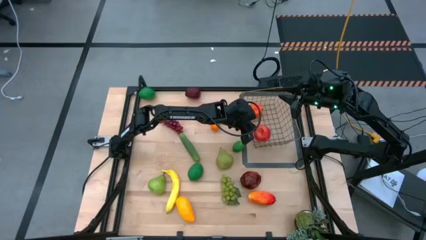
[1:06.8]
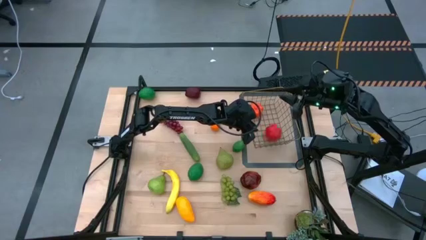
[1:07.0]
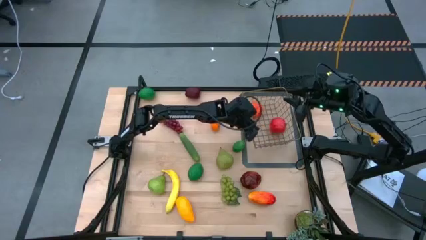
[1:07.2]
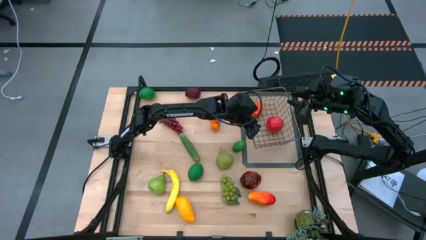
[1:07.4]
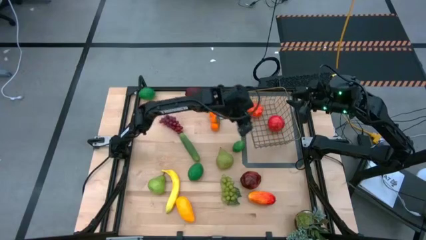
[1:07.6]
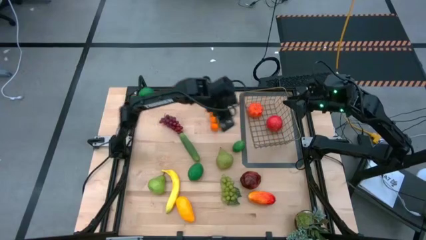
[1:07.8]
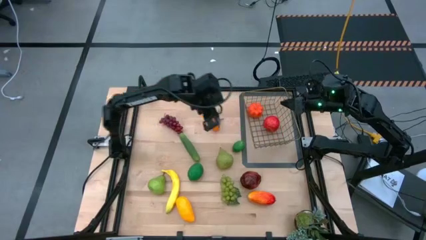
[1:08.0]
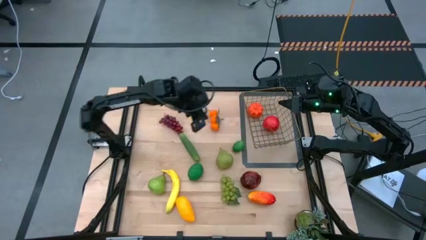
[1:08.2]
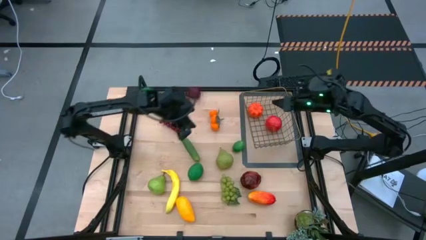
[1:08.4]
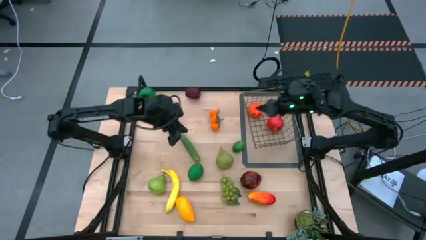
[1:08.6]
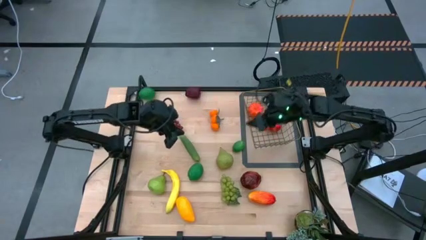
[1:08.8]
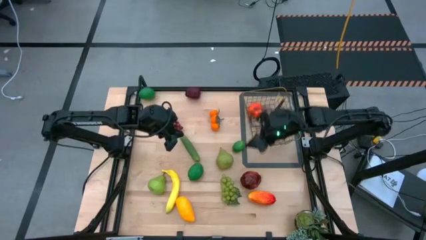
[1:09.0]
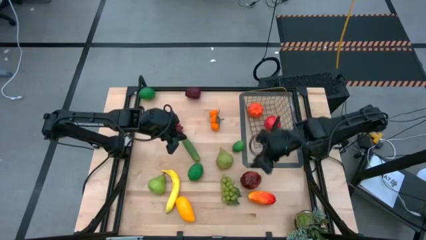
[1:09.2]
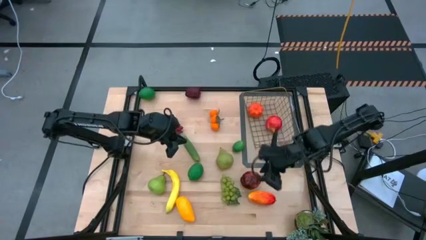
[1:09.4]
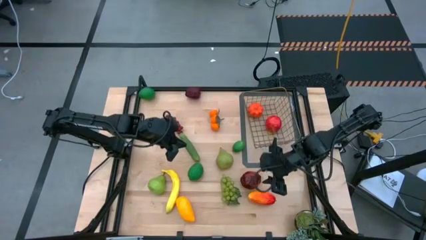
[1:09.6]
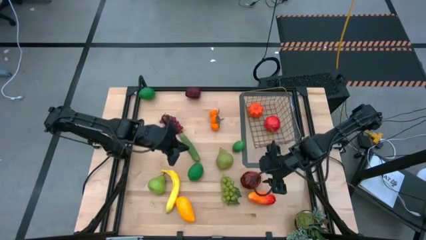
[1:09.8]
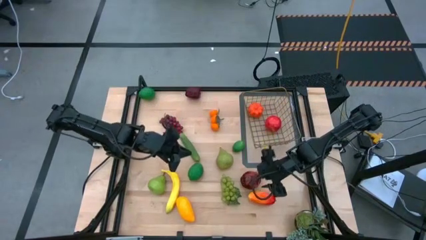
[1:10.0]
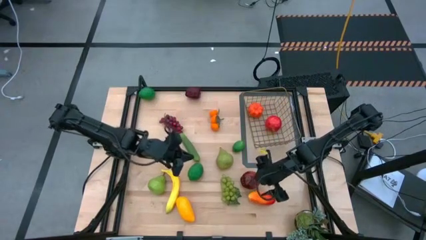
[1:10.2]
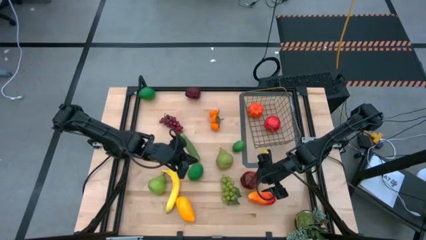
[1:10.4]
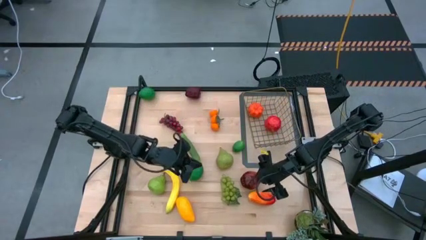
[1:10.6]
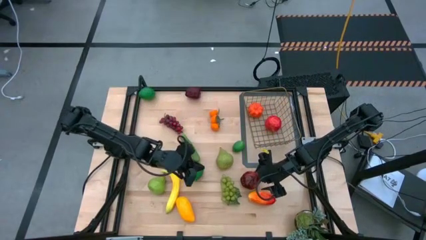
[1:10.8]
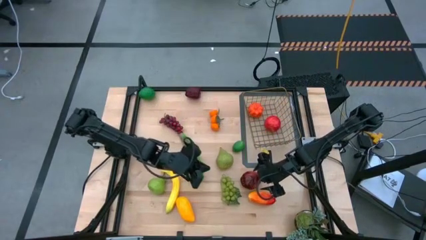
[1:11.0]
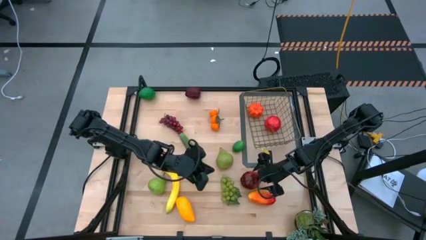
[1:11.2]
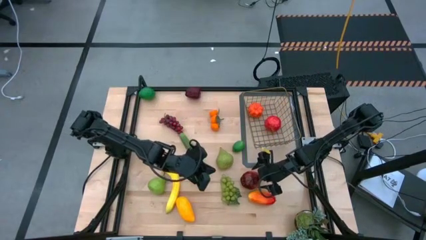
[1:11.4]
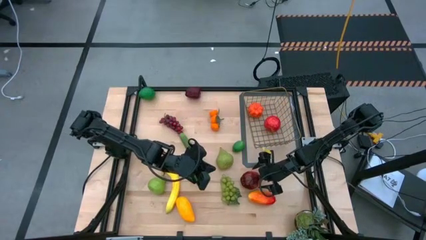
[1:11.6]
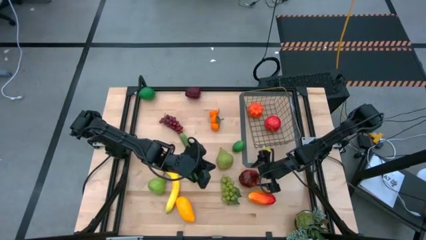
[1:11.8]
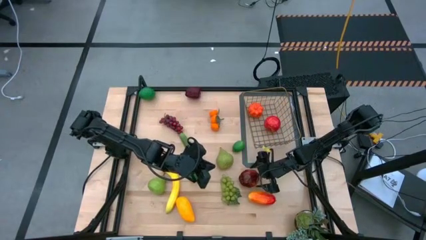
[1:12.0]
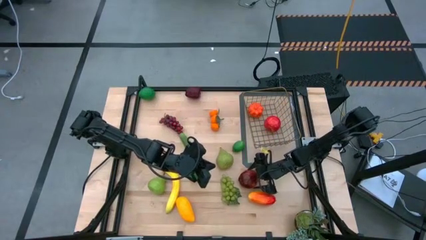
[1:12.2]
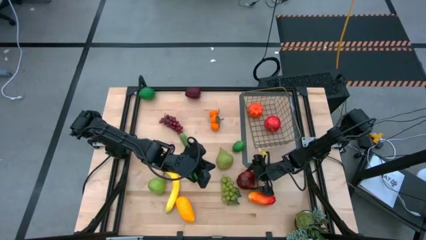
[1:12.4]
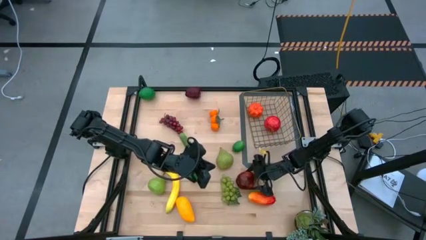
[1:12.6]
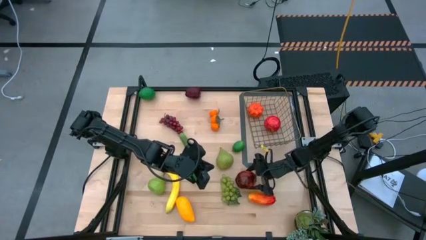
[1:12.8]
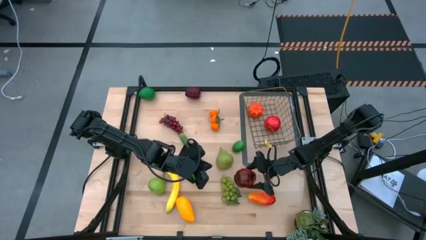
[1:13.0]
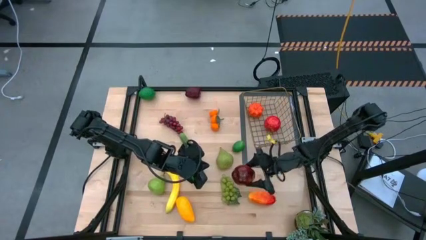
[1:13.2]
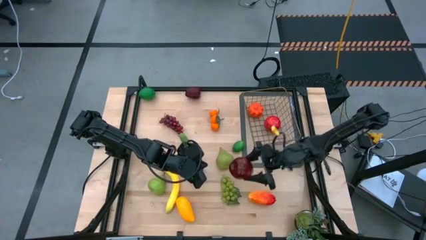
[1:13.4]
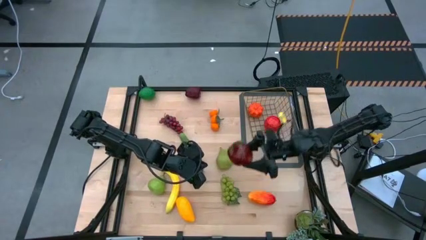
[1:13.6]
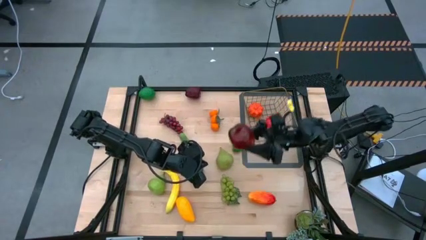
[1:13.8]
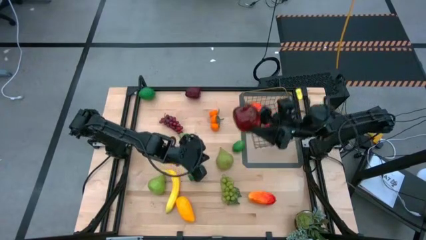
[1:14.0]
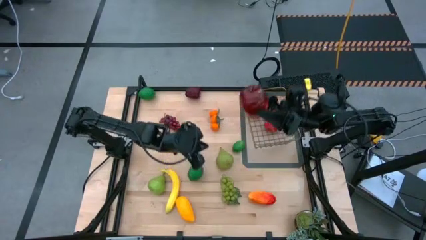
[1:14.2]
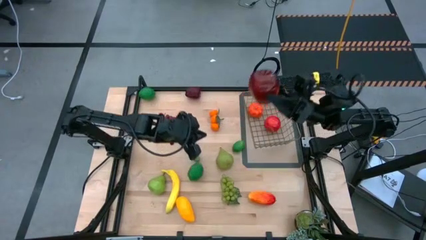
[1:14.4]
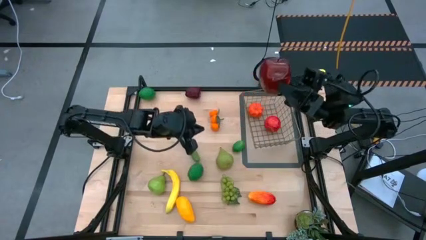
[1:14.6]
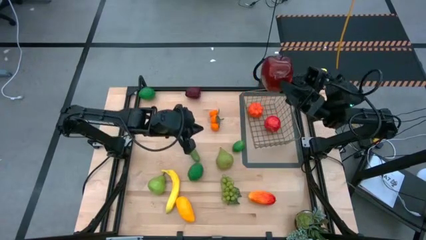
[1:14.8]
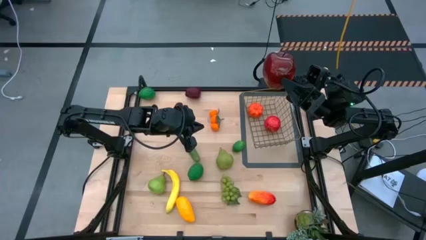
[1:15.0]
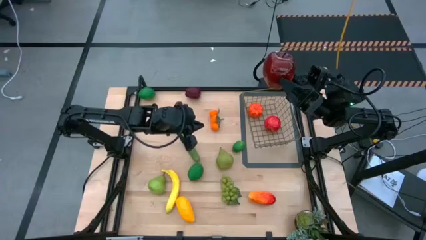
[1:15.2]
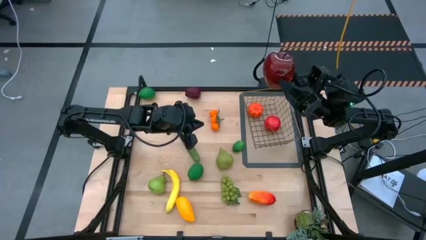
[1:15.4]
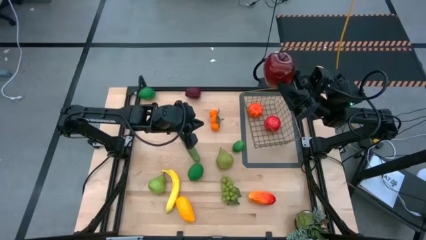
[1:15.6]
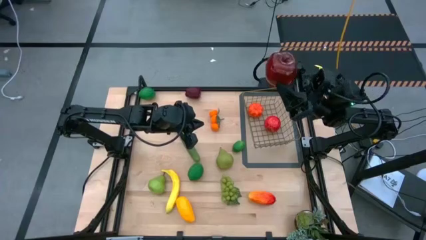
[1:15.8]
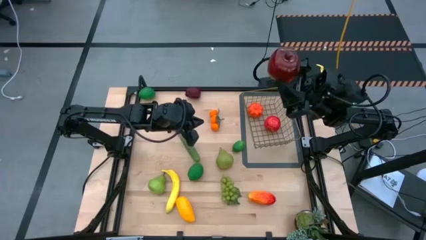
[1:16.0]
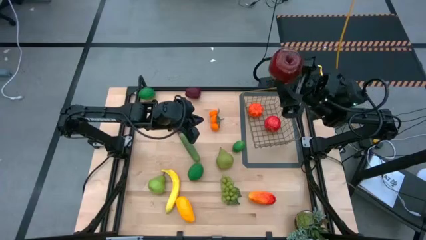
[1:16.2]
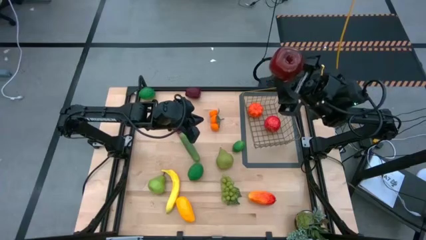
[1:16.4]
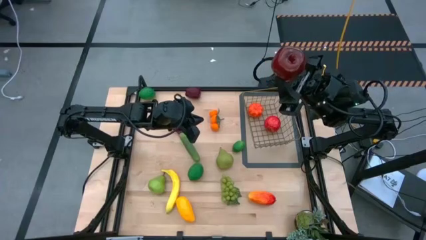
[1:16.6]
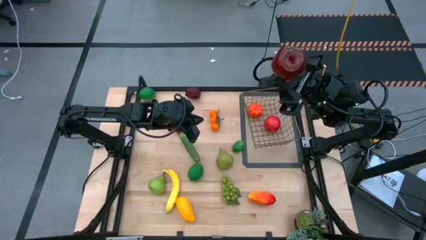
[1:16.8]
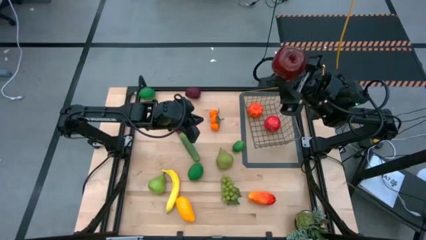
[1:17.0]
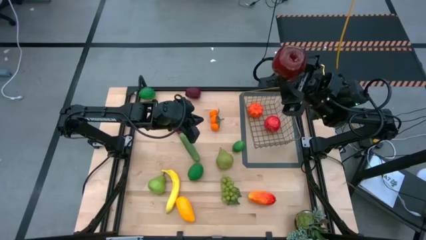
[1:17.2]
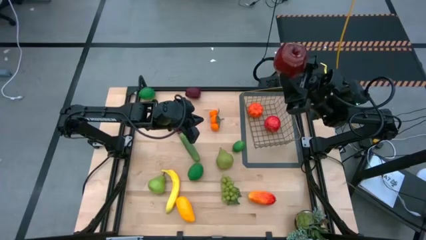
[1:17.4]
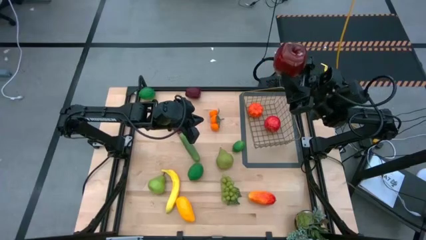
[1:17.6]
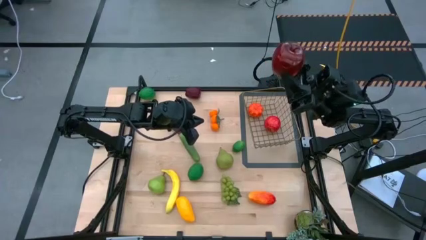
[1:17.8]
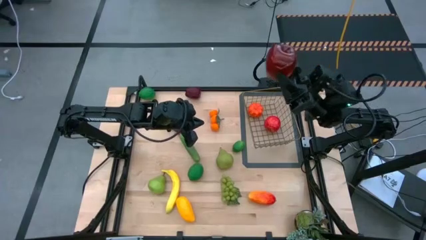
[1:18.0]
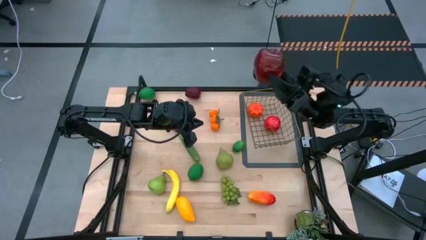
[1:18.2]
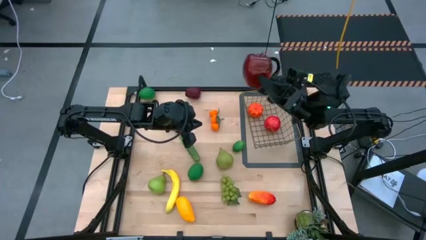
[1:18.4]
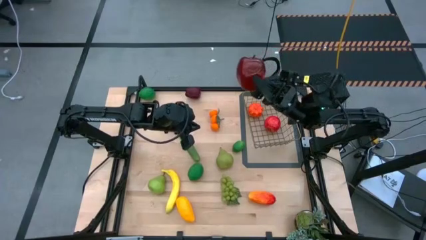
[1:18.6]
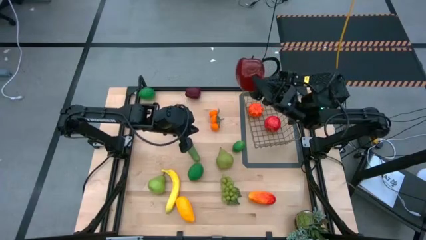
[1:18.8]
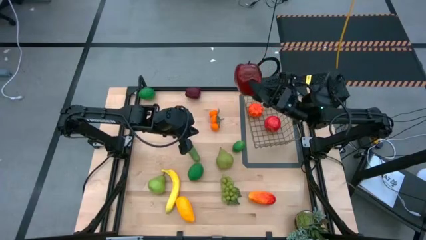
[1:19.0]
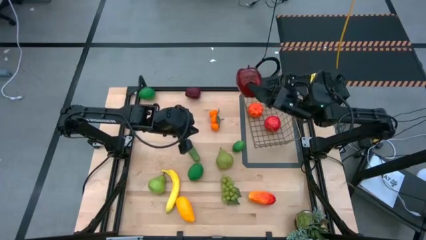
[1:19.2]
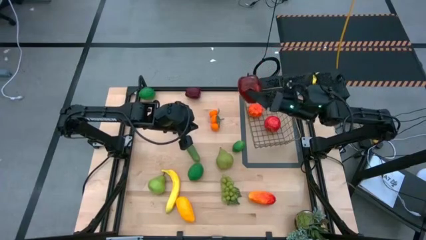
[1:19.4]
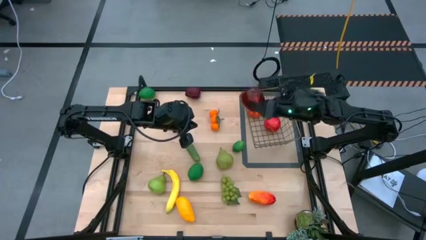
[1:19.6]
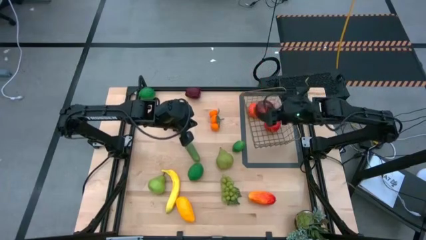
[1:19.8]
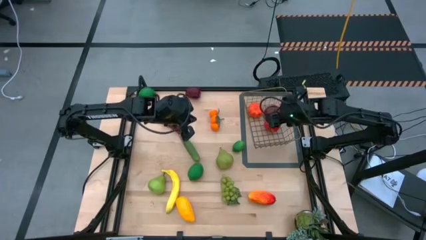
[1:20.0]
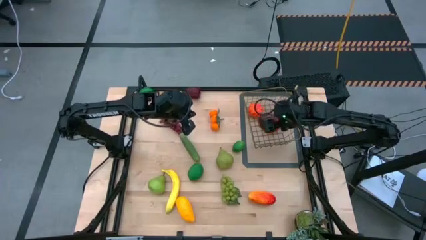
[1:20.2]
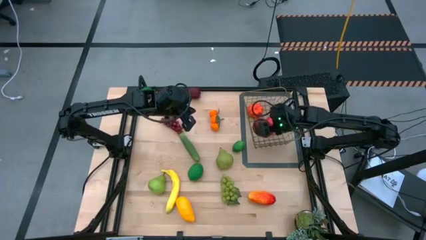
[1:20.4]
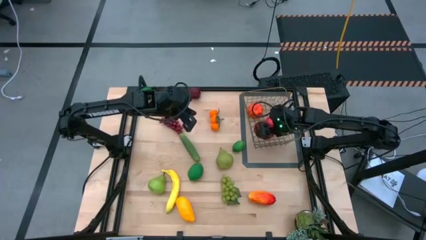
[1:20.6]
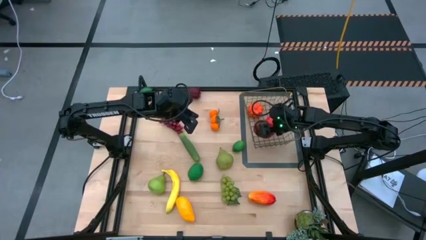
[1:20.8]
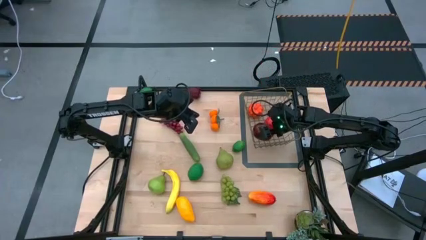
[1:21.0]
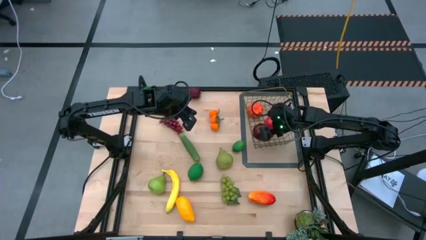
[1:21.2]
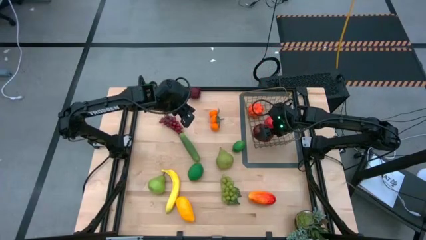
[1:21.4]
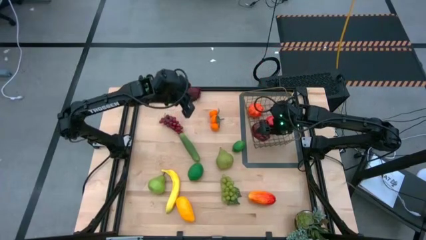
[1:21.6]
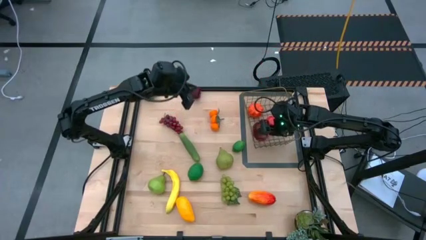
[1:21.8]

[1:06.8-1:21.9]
Task: Build produce basket
Put the bottom red apple into the wire basket

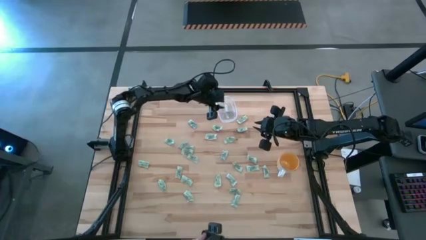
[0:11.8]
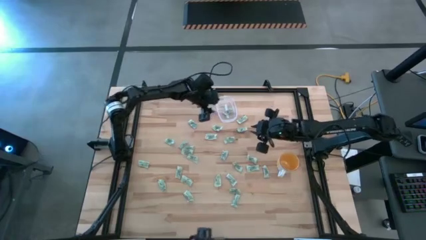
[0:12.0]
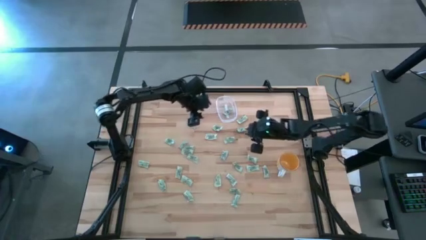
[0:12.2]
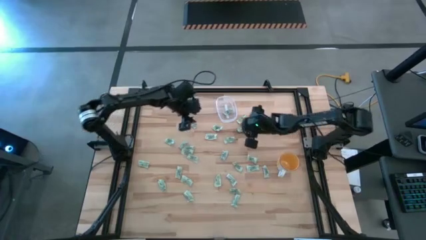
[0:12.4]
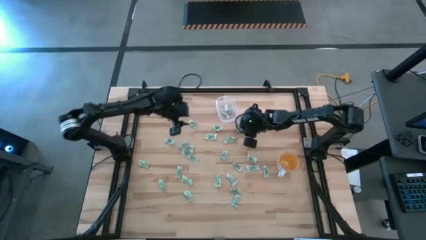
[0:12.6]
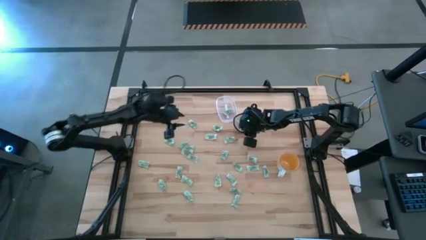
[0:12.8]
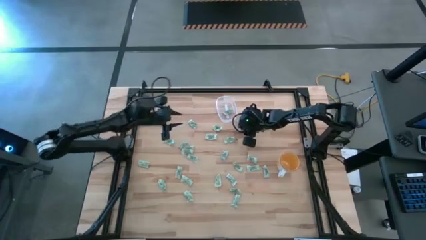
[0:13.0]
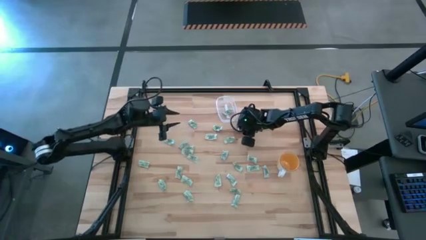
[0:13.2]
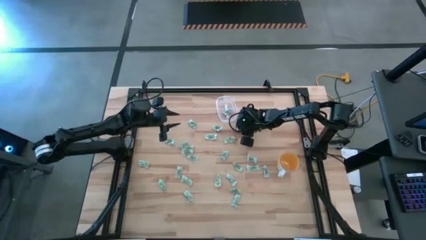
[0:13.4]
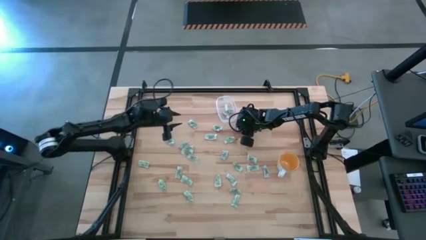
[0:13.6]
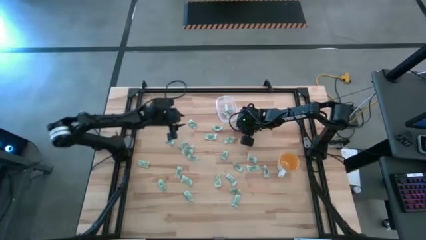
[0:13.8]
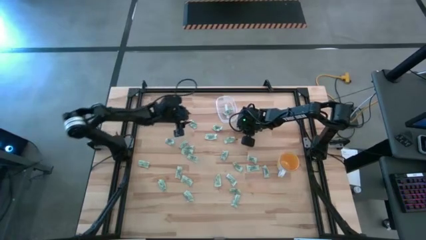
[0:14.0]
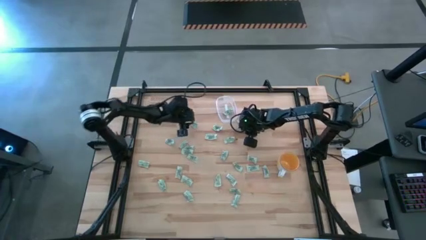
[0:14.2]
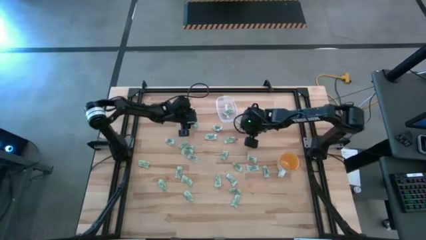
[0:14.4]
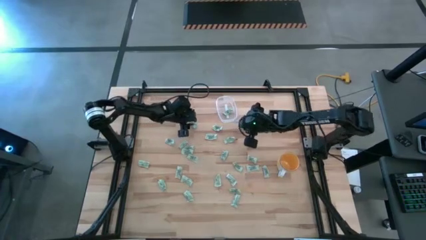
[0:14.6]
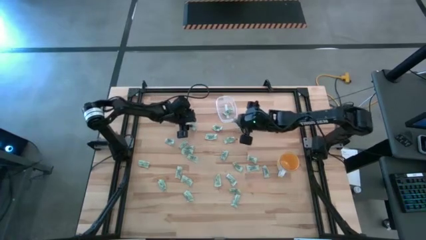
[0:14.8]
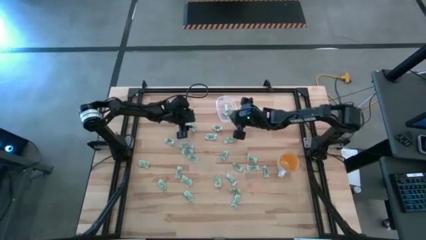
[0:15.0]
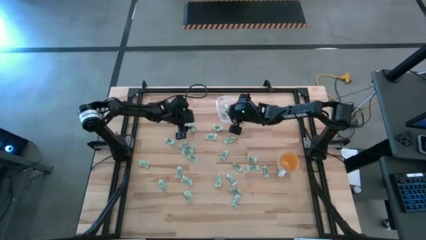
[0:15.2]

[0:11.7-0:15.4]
Task: Pick and place Stevia / Truvia into bins
Put the green stevia packet into the transparent bin
